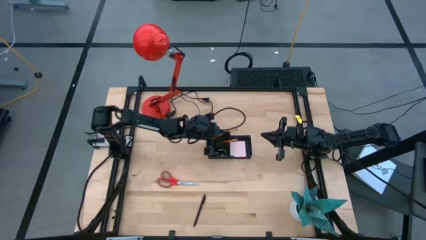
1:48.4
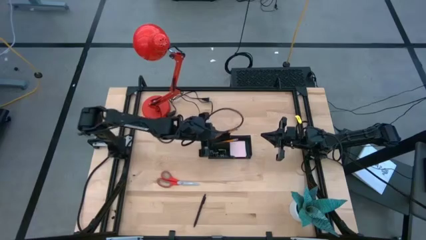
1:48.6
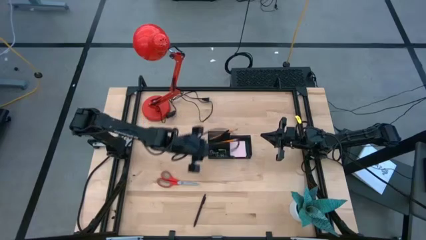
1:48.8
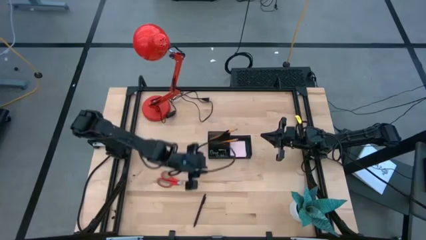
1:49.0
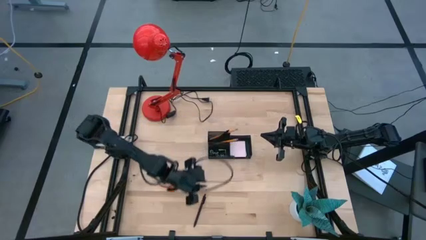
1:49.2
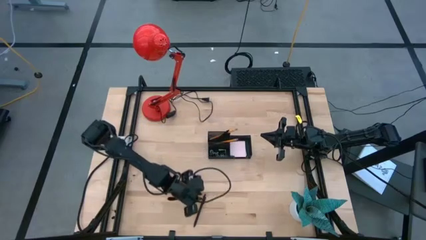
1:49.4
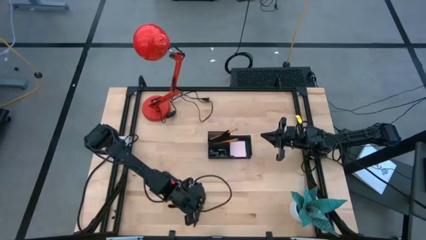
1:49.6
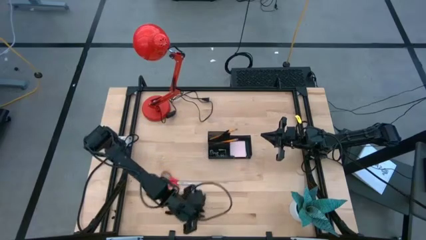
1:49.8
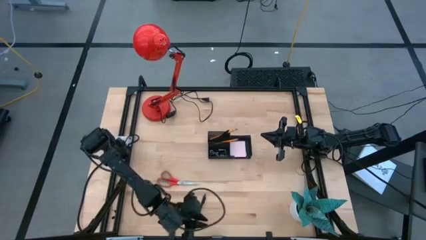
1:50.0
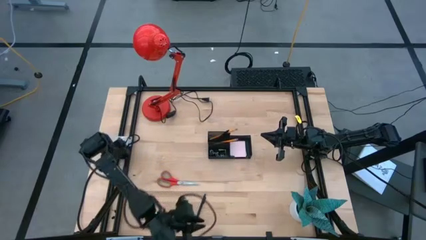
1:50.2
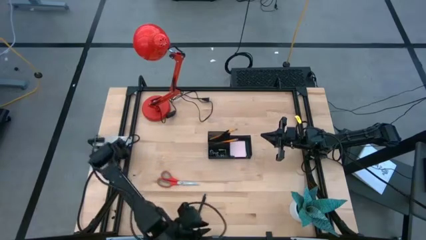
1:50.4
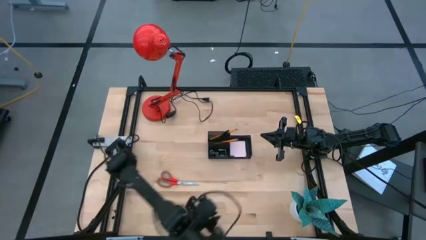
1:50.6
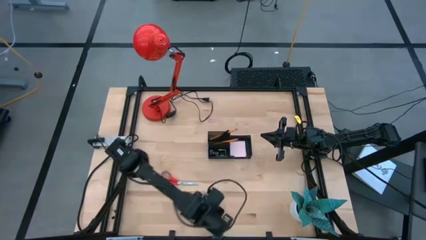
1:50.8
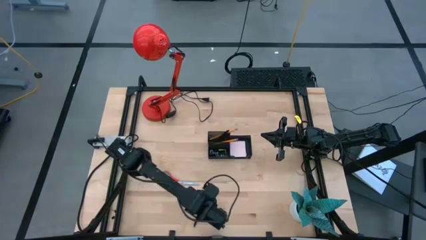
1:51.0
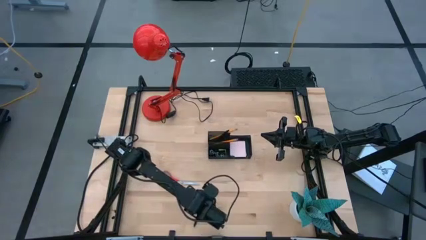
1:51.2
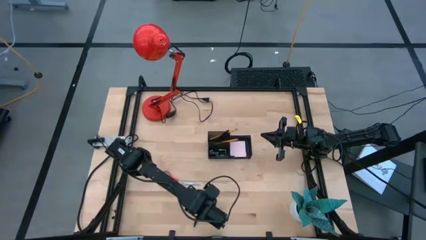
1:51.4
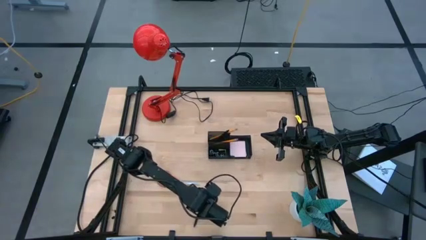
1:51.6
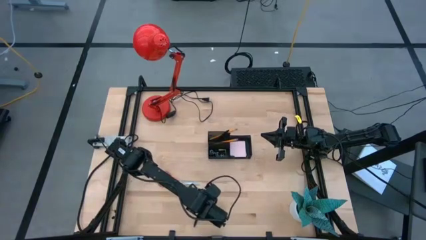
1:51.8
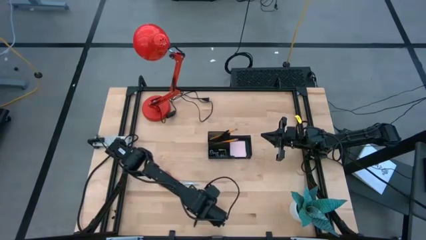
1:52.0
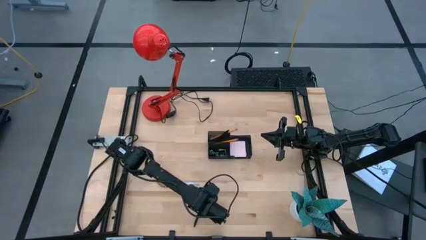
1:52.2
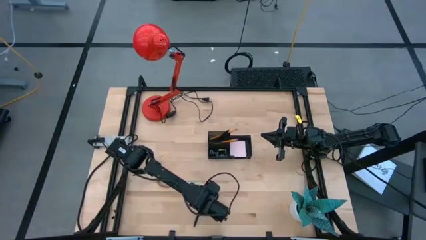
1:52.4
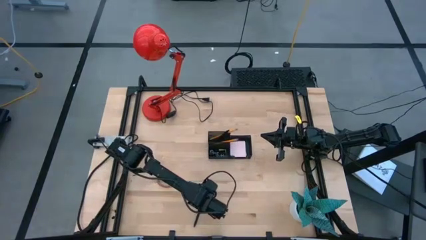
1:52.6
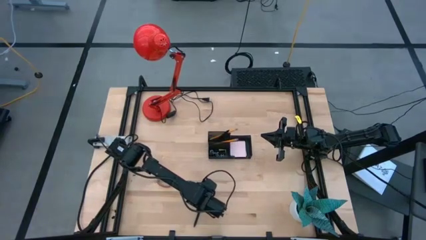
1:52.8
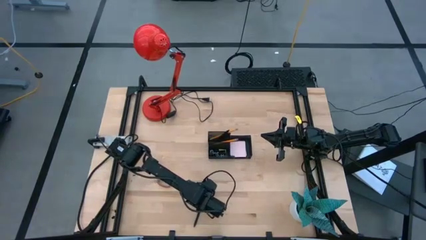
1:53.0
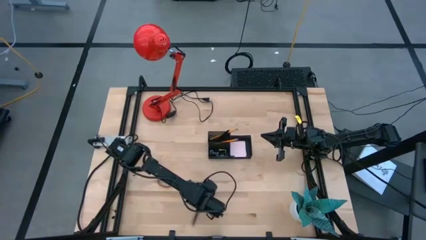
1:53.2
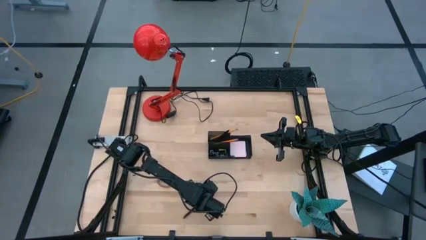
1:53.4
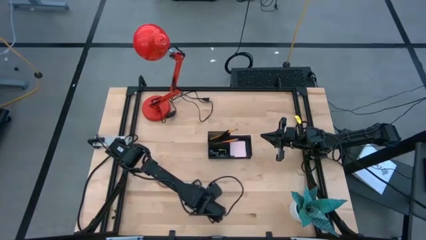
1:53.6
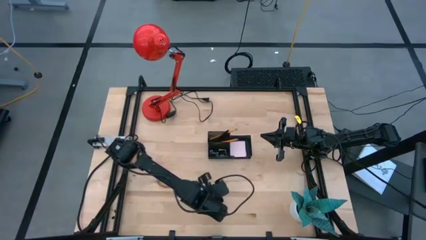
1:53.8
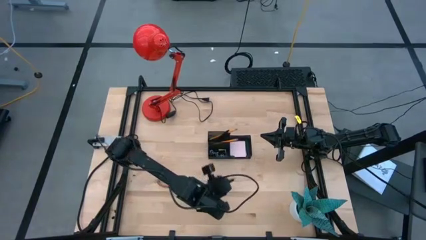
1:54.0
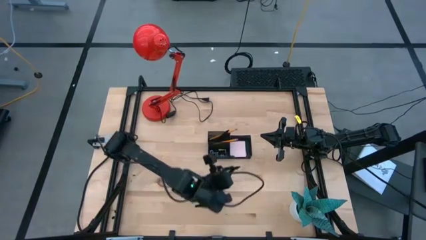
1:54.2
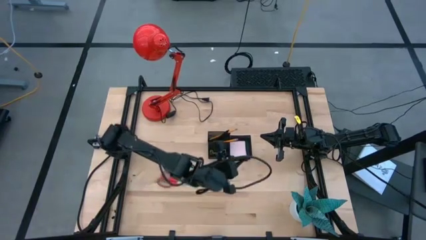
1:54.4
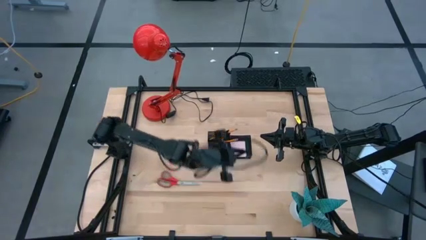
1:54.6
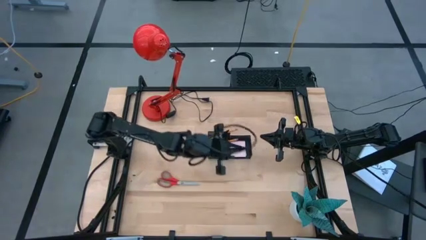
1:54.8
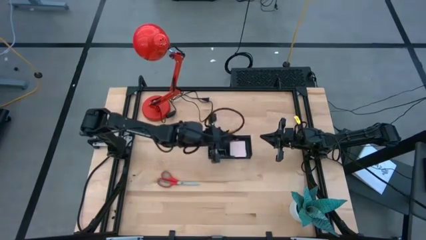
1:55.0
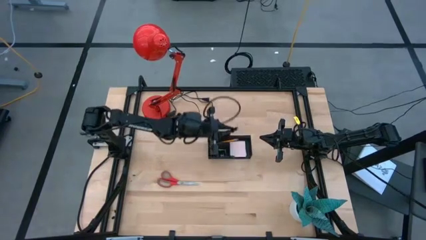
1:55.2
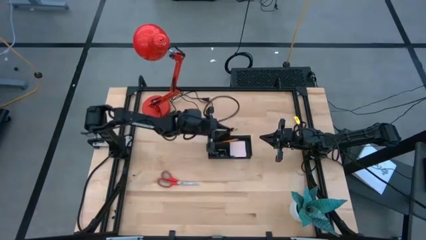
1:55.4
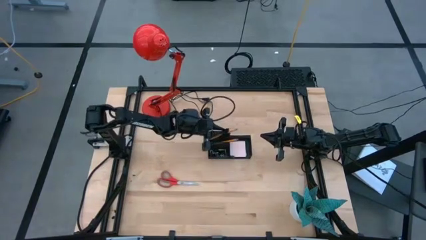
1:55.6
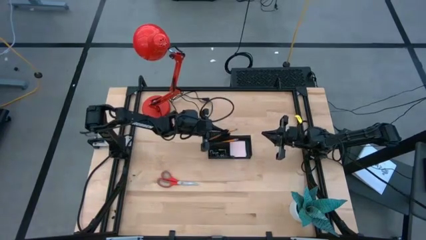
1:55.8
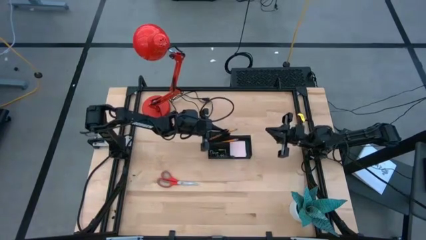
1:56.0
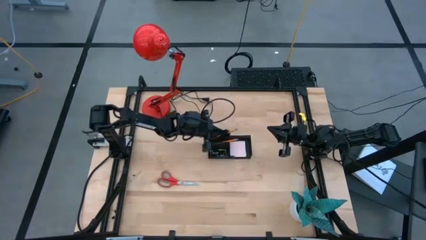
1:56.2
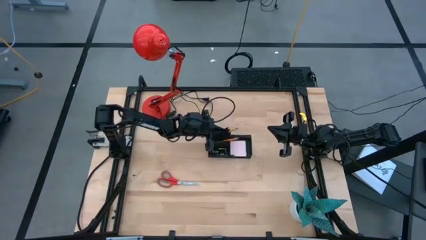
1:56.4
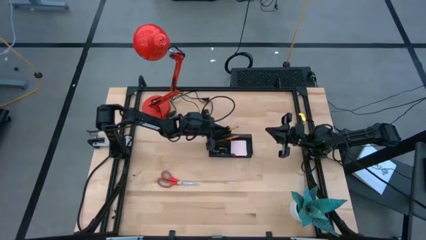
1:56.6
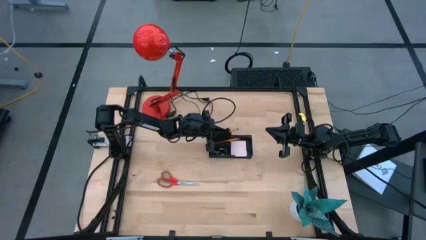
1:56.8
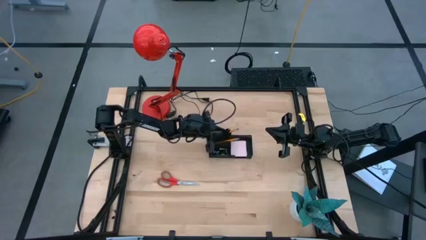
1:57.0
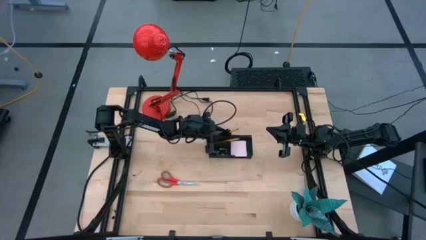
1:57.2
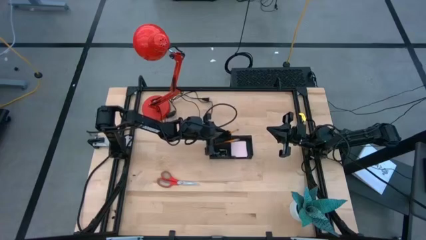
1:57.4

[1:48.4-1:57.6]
Task: Pick and place office supplies into organizer
Put the black pen into the black desk organizer

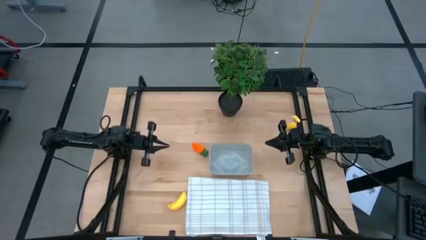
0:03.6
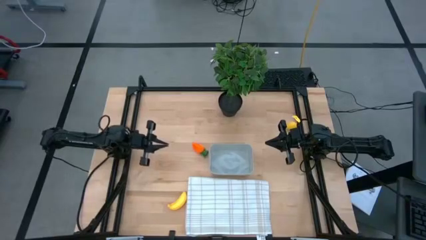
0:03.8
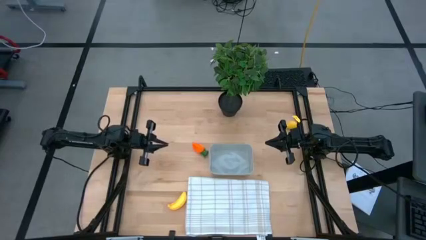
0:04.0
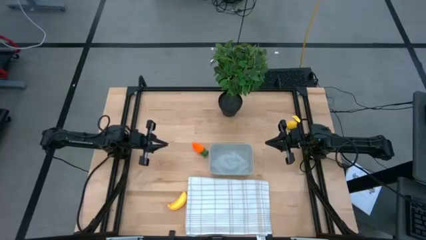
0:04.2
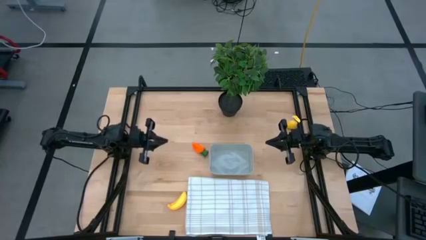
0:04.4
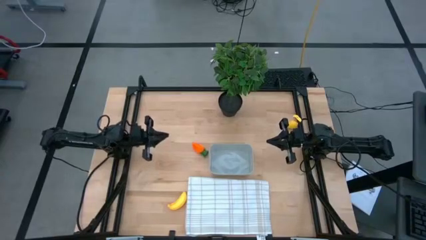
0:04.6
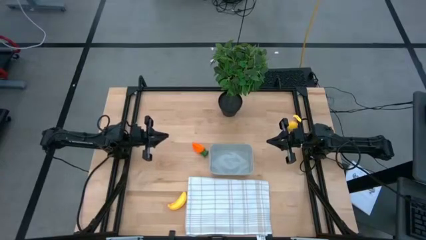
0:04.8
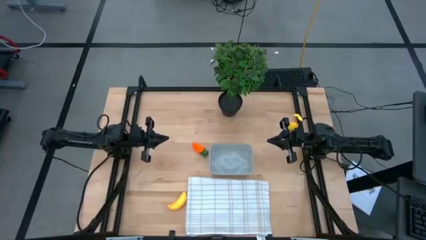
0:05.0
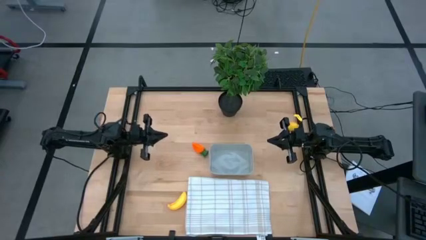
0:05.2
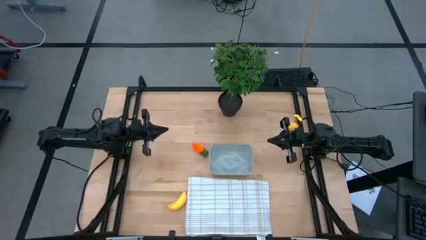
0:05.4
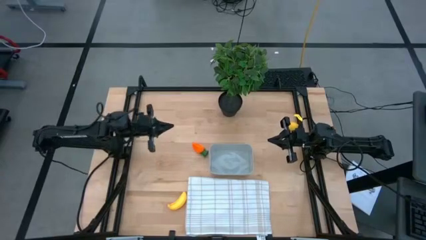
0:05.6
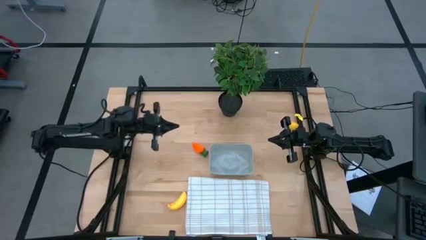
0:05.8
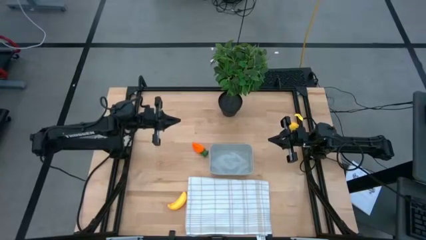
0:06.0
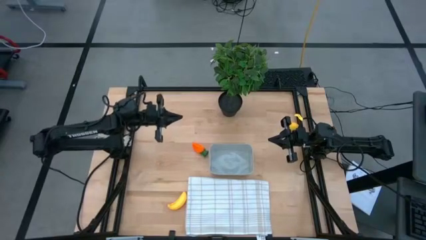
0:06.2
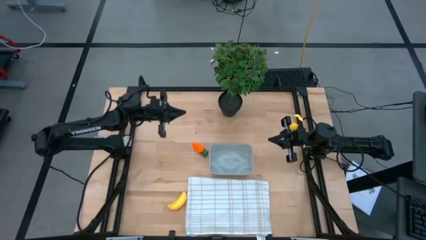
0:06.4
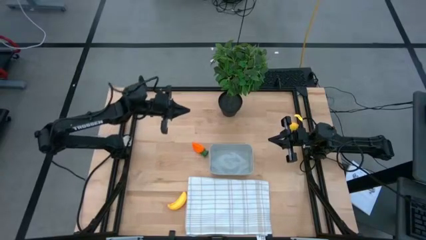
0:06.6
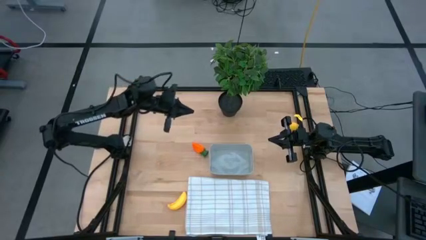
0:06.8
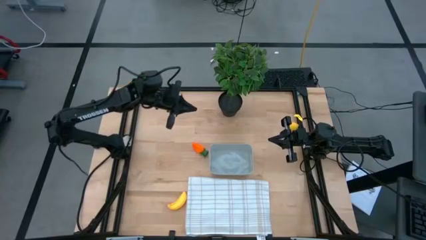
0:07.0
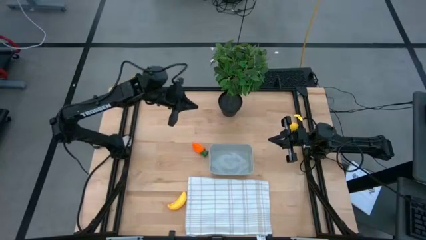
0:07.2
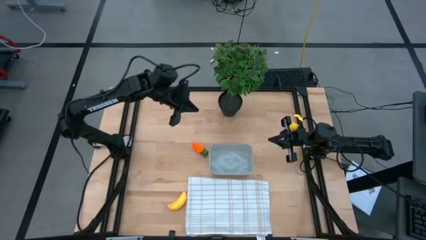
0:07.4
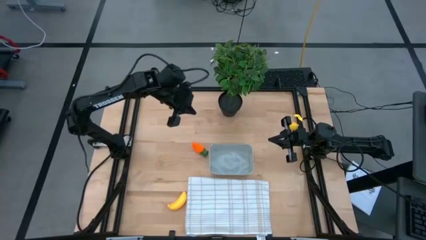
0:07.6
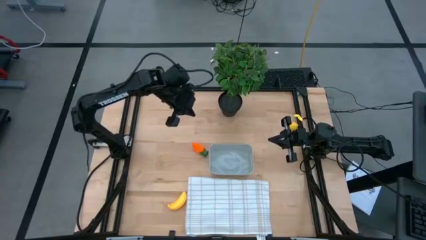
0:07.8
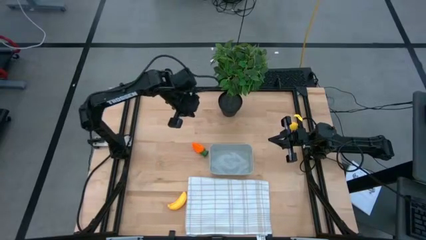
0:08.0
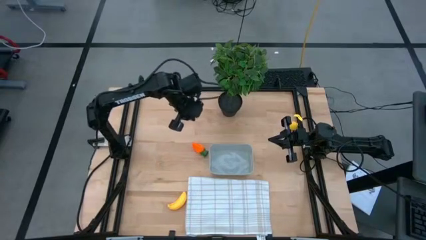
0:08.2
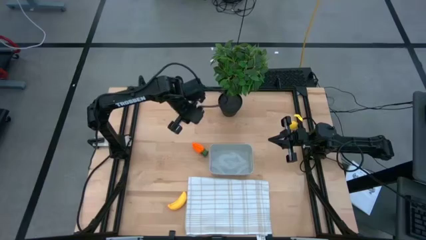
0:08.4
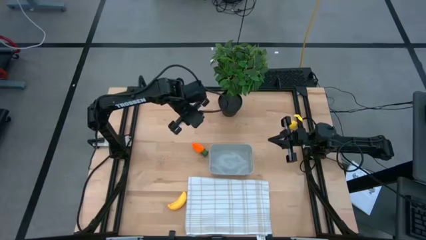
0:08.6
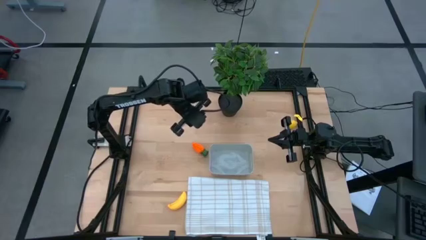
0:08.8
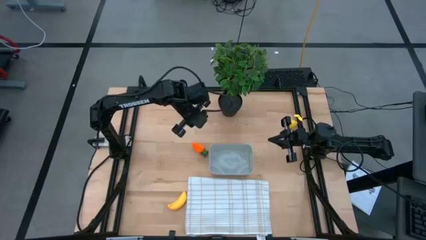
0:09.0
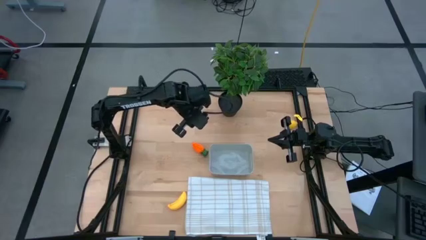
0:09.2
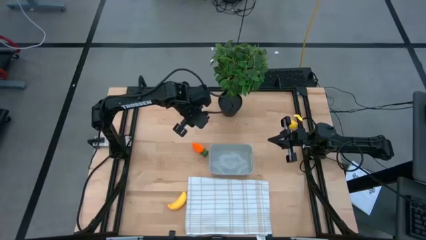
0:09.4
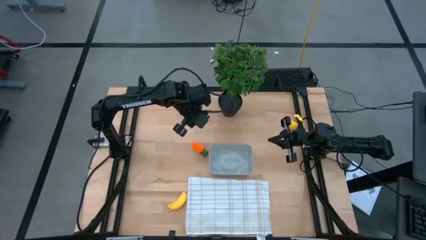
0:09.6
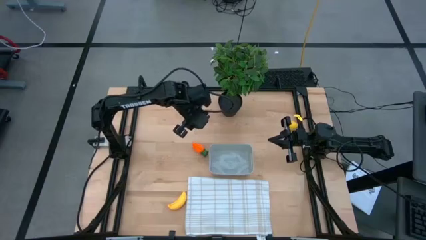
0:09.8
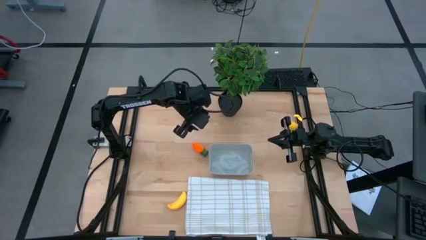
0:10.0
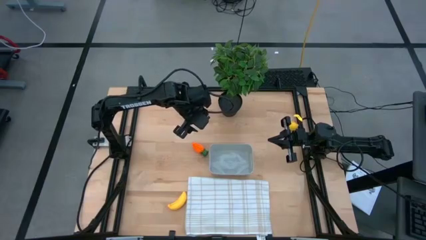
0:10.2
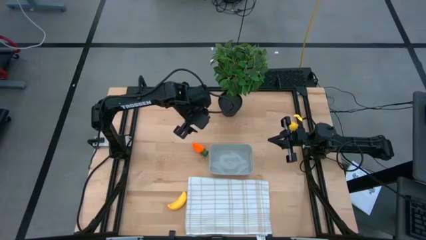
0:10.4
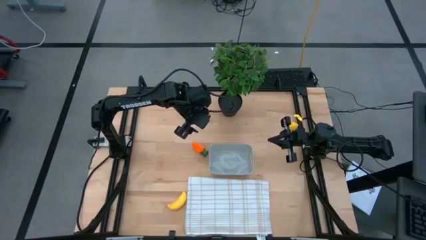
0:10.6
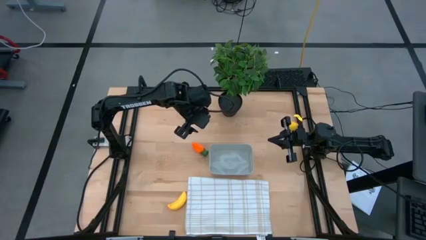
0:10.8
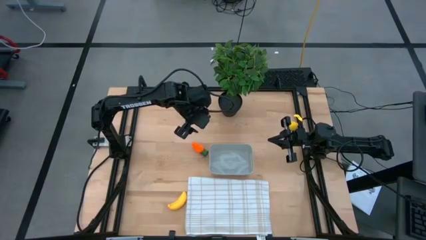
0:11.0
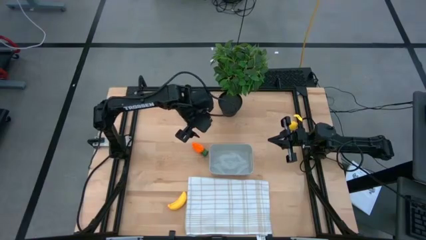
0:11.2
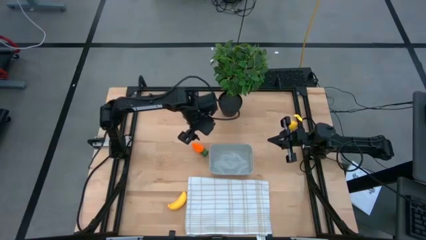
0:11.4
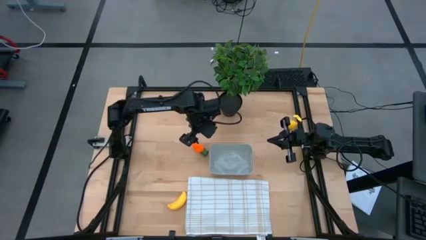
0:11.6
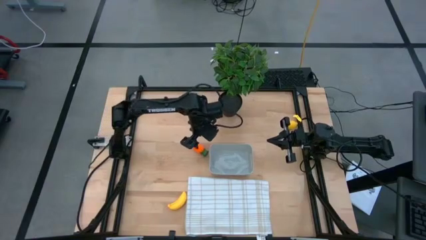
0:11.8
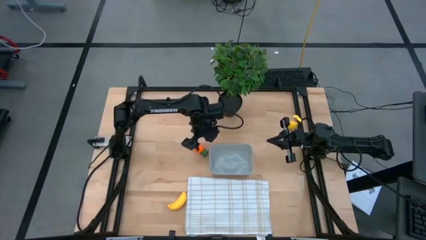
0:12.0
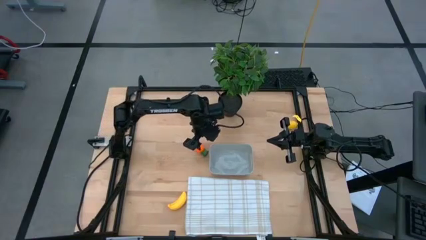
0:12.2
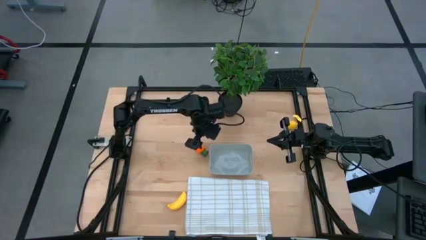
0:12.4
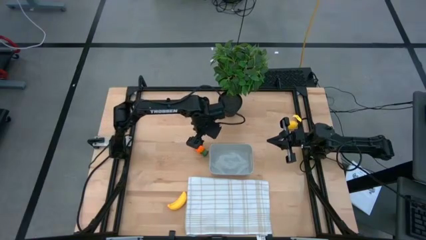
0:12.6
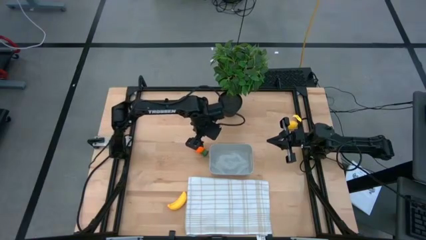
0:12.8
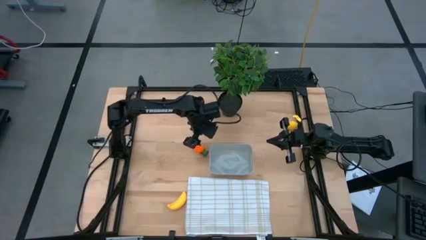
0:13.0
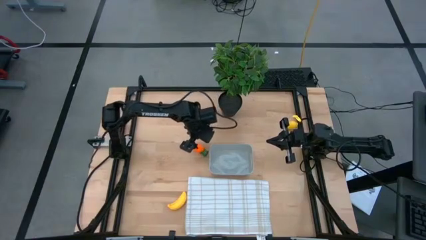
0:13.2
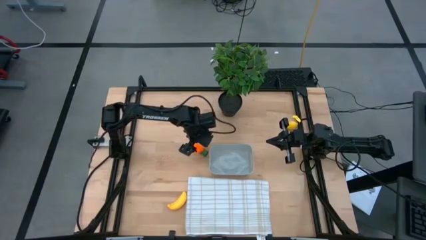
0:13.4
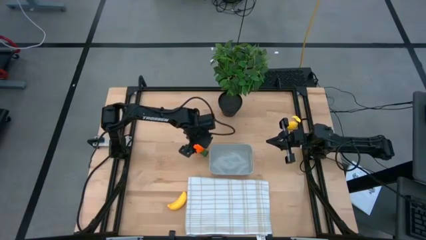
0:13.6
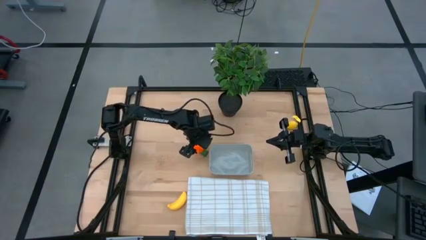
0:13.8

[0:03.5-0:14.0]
Task: Pick and placing Produce into tupperware
Put the carrot into the bin
